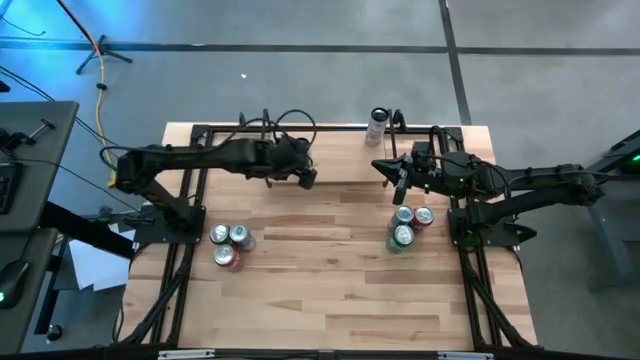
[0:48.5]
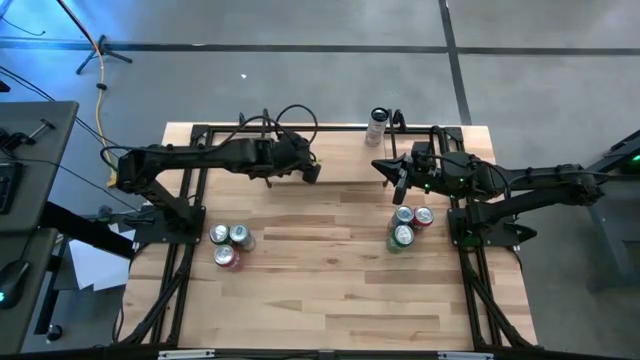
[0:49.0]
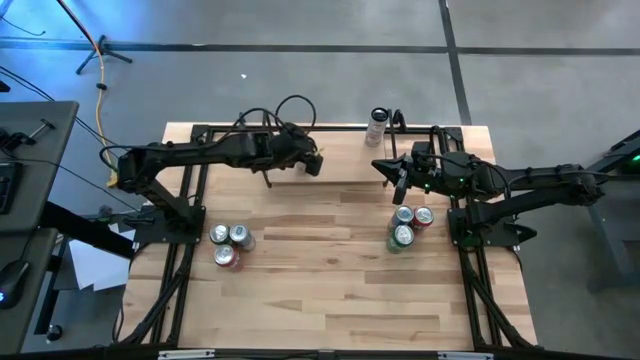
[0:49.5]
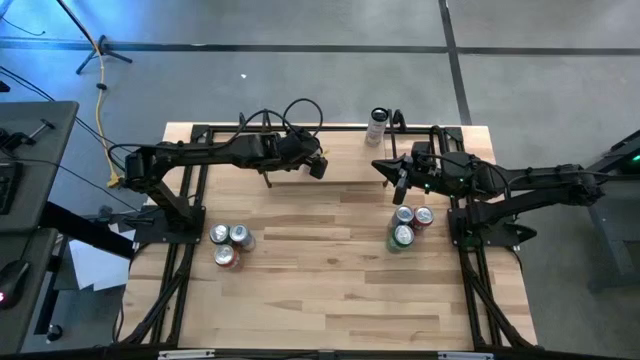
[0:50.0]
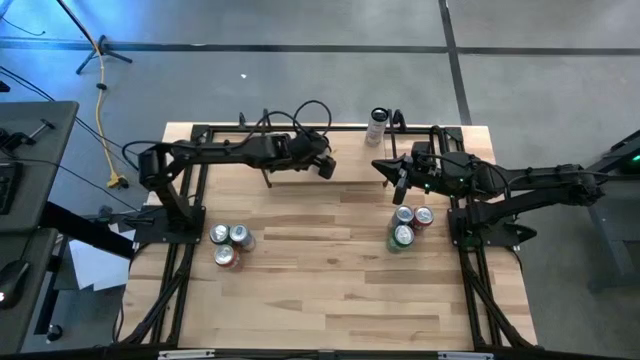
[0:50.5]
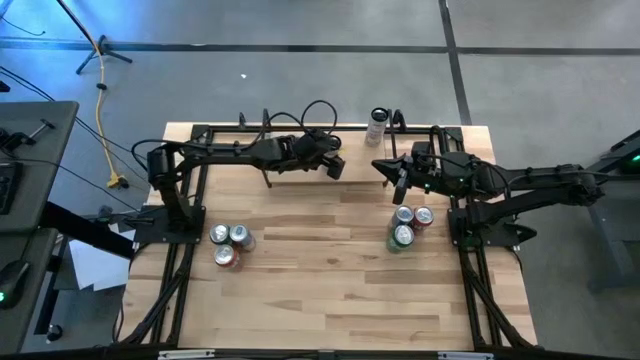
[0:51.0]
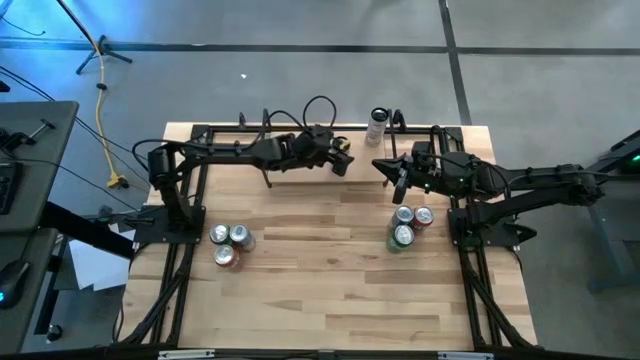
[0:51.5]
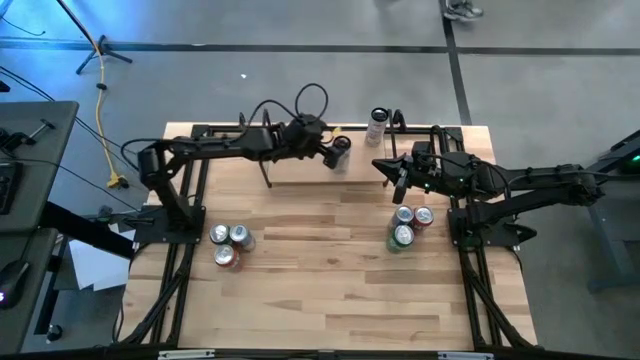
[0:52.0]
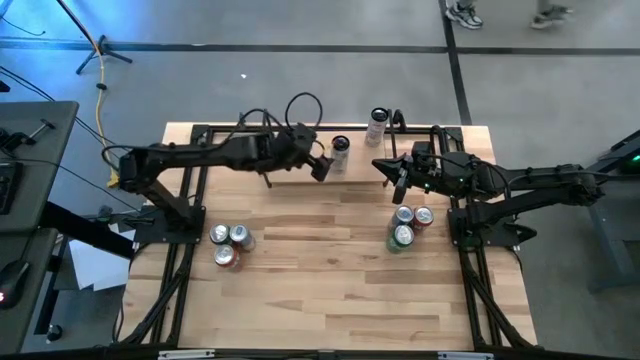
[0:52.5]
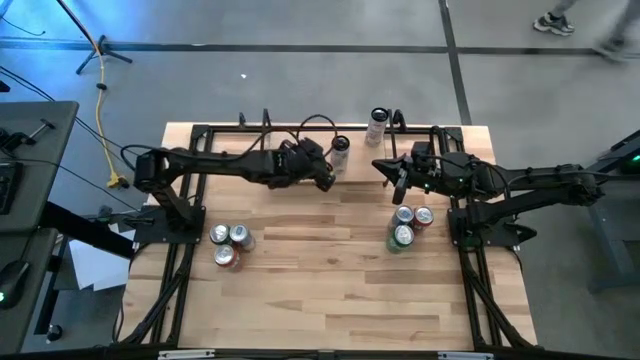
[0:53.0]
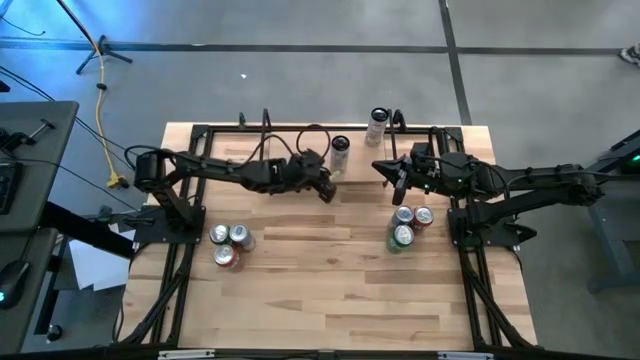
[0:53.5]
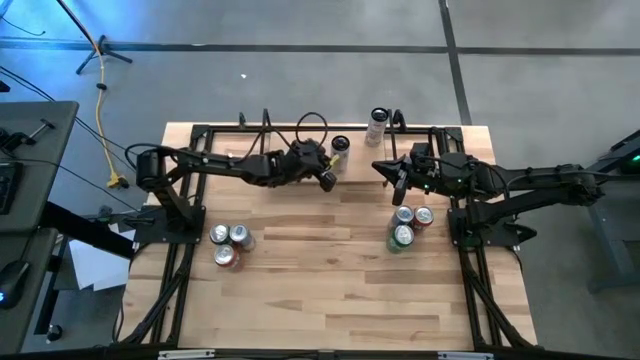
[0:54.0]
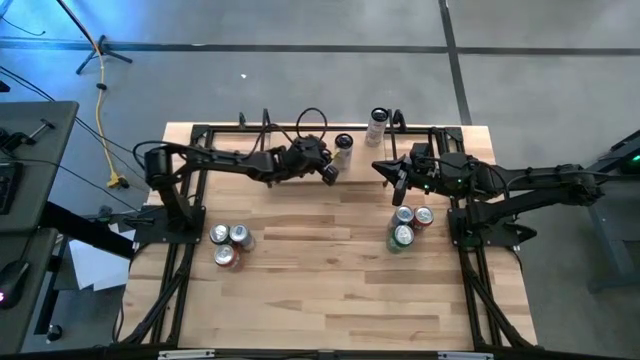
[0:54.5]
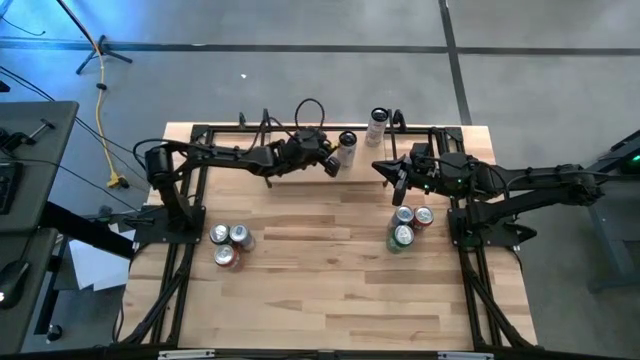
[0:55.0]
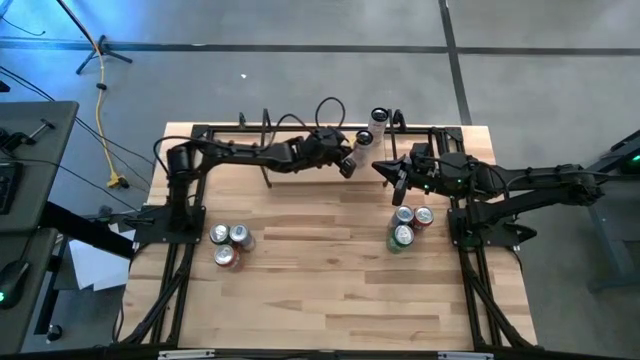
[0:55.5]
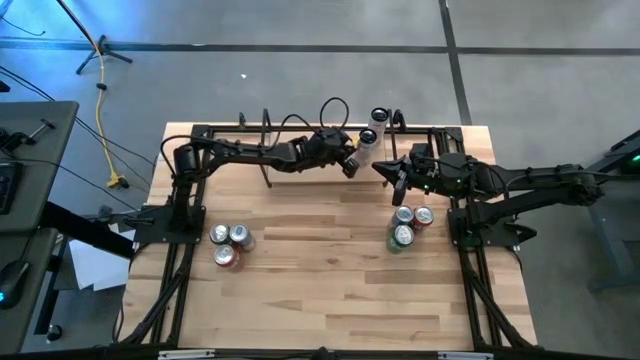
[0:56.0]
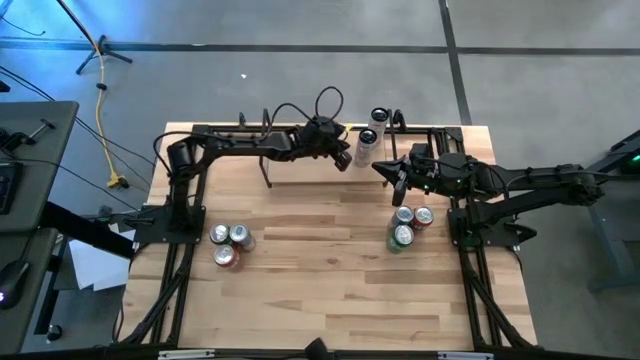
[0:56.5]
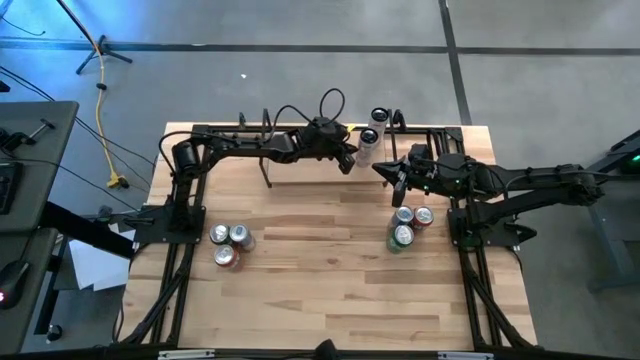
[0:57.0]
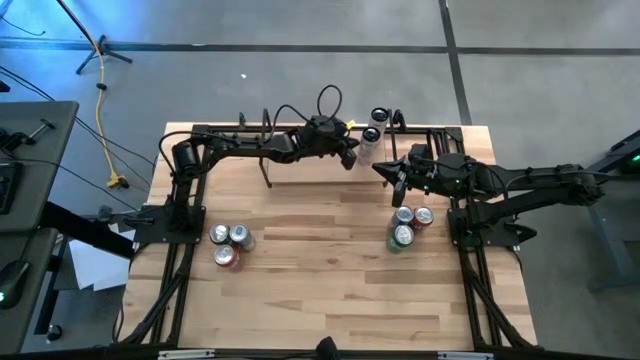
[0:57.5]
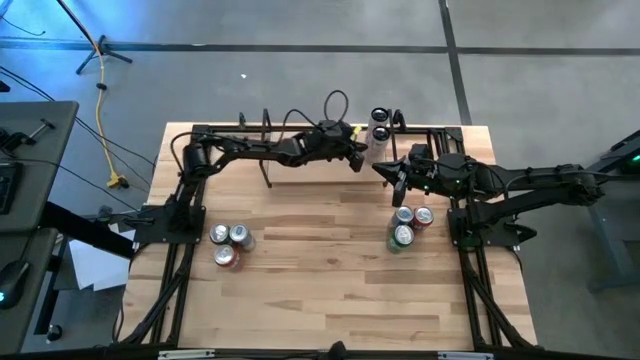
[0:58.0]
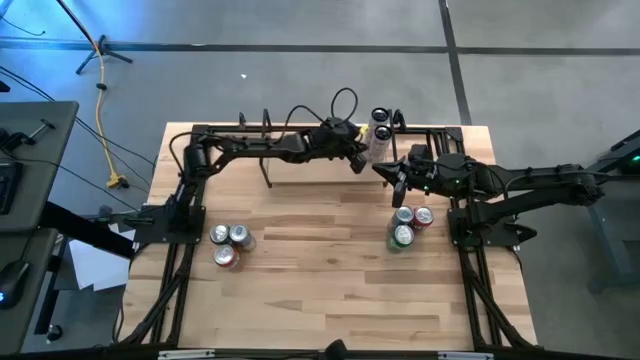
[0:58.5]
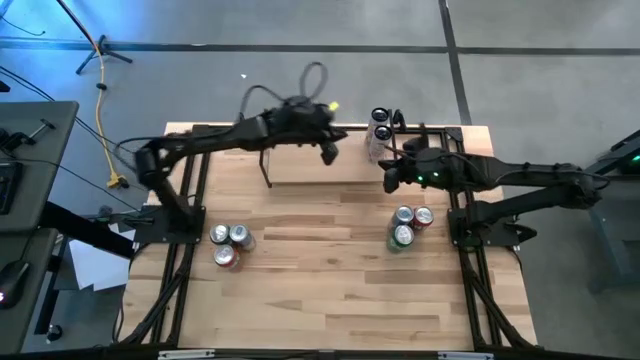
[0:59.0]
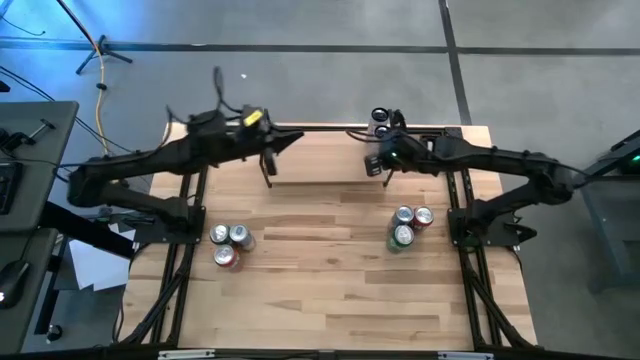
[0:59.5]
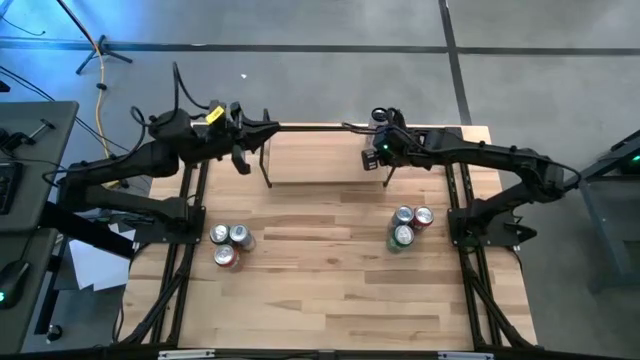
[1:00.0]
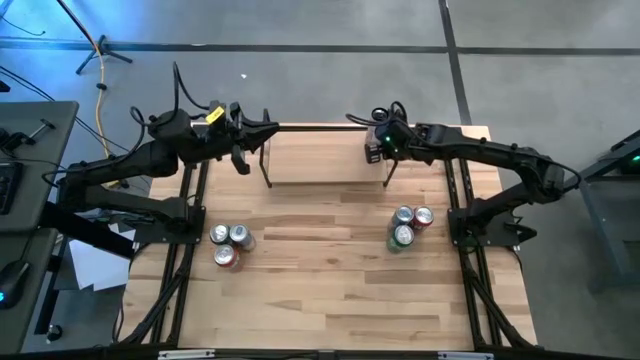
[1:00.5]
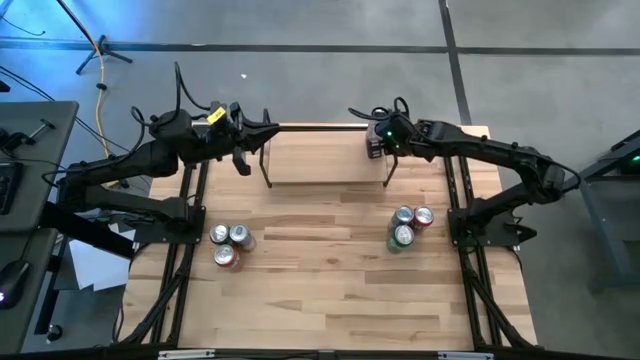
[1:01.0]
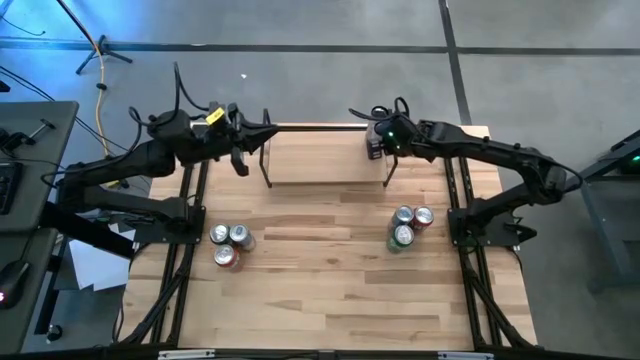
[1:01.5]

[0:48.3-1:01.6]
Task: Place canned beverage on shelf
Put the white soda can on the shelf and align it with the other white soda can

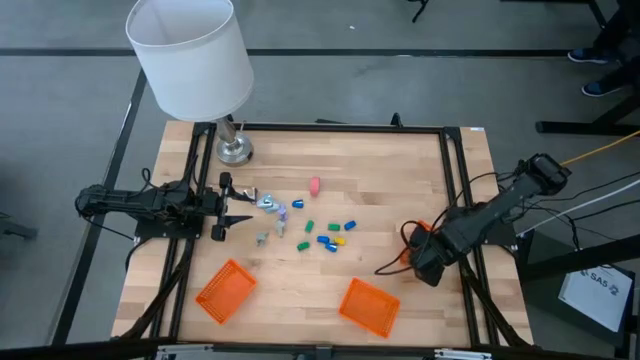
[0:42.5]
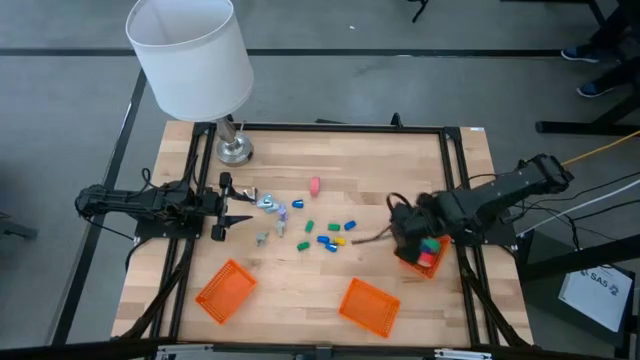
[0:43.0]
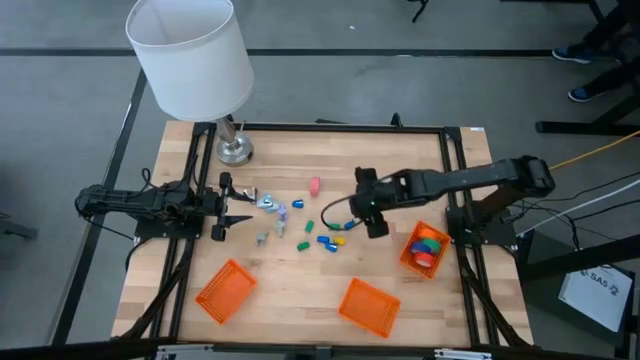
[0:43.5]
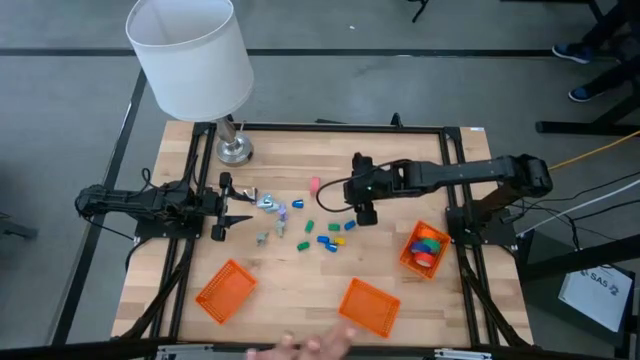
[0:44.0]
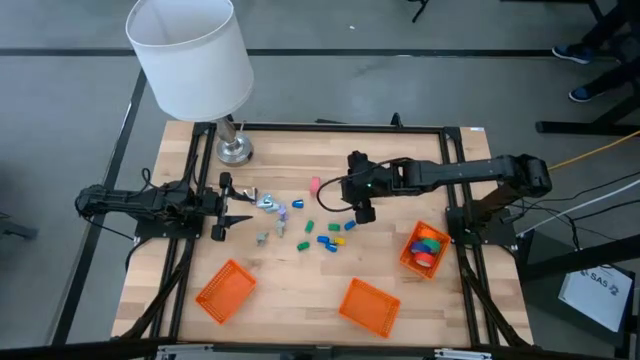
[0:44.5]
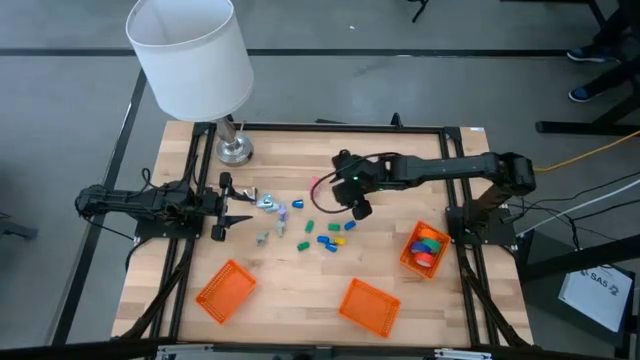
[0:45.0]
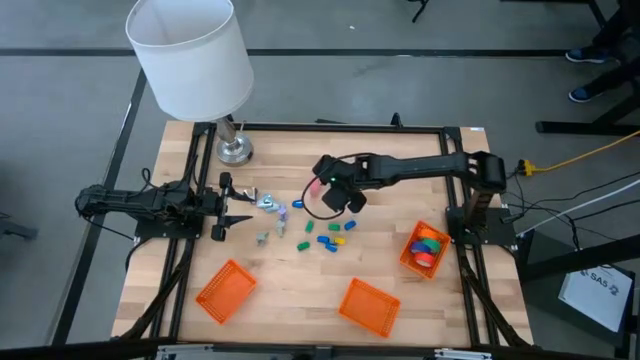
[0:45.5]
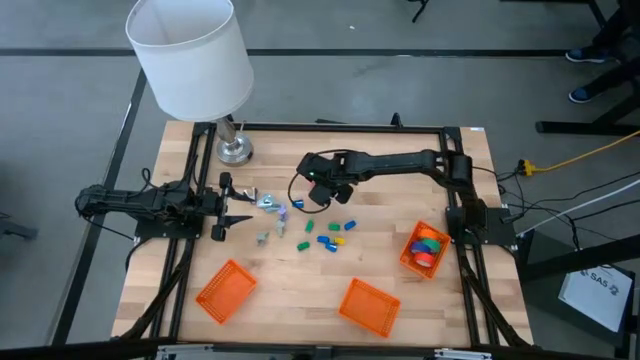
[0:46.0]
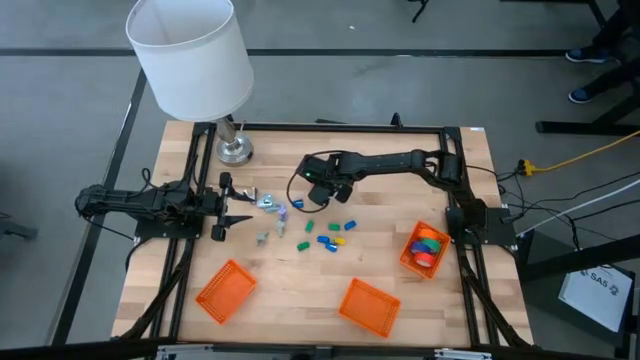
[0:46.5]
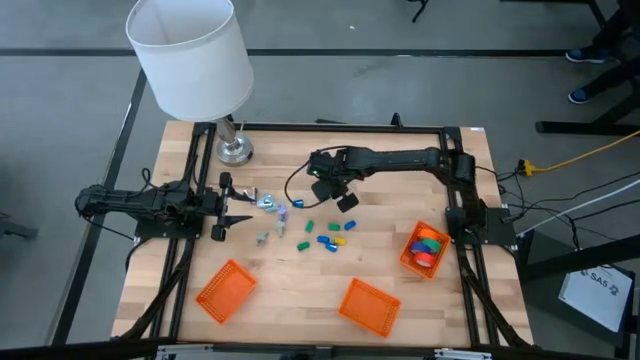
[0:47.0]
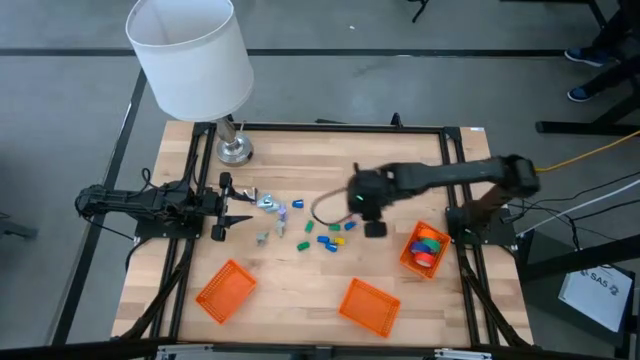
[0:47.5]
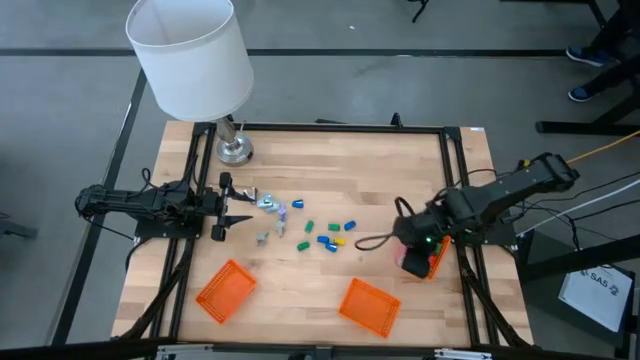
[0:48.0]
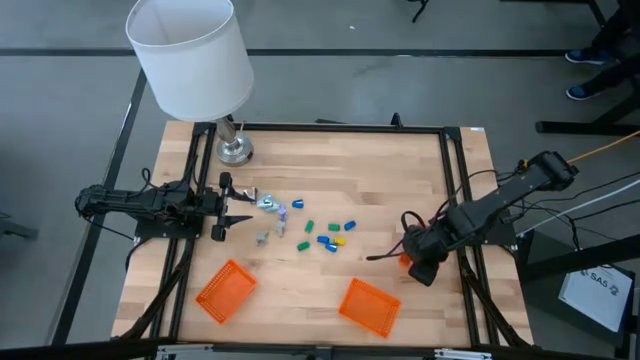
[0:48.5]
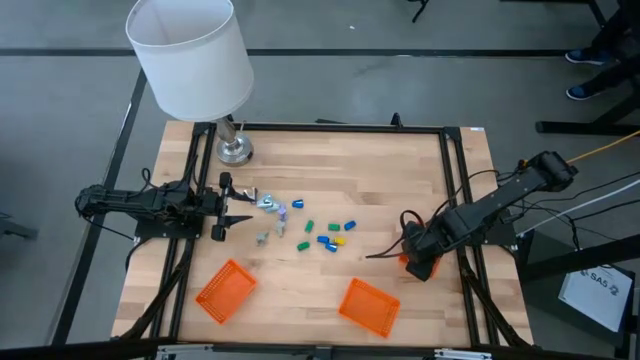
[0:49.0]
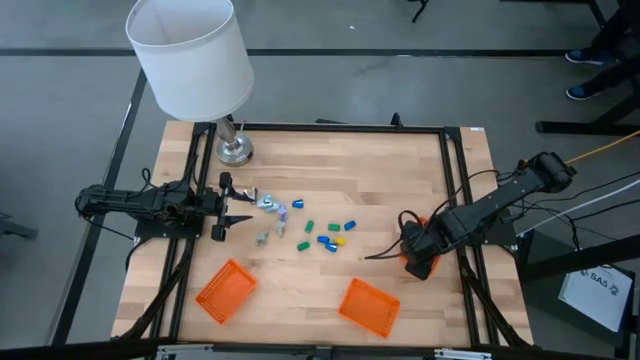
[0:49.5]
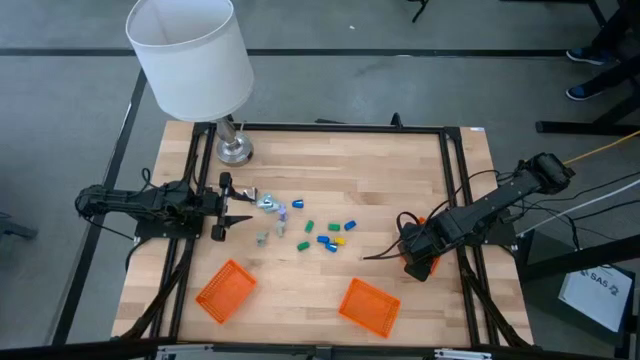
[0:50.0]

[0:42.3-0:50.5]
Task: Pick and place Stapler, Stapler remover, tape
Put the pink tape into the right orange bin
